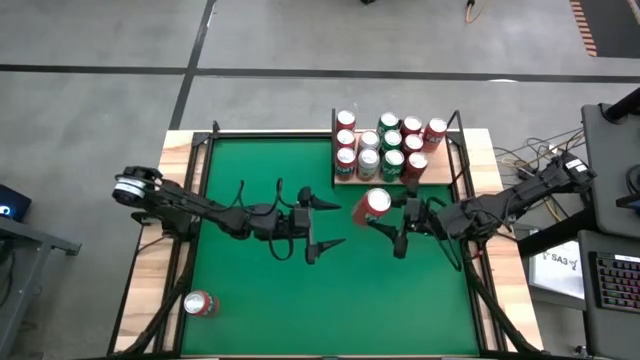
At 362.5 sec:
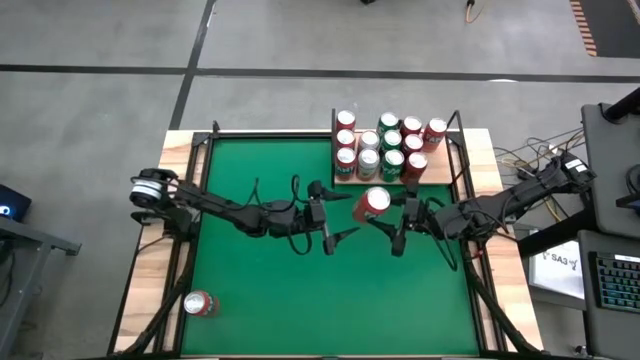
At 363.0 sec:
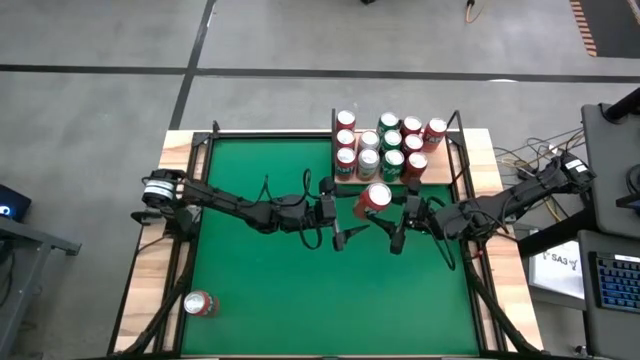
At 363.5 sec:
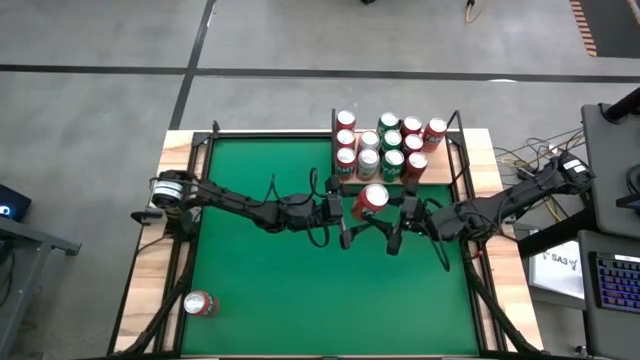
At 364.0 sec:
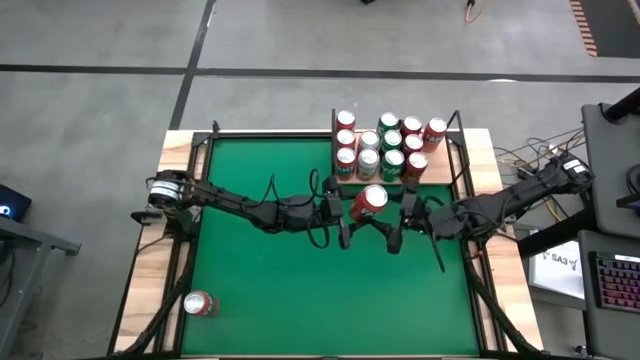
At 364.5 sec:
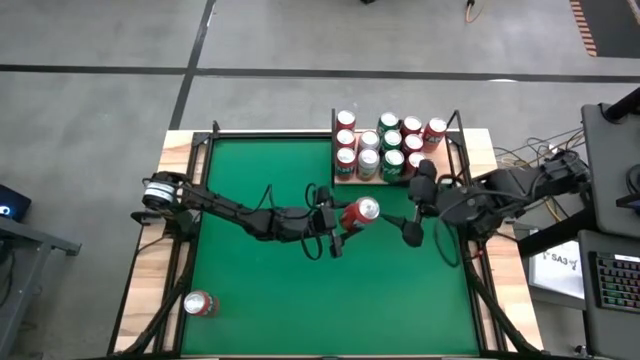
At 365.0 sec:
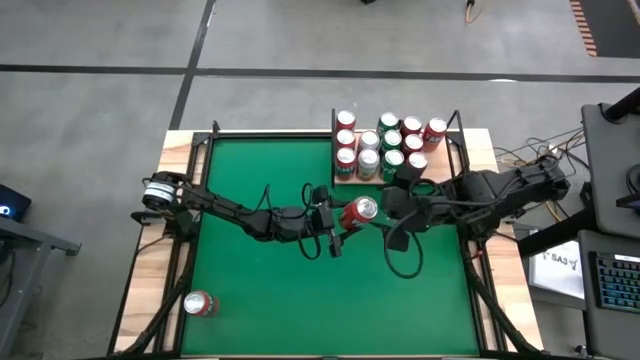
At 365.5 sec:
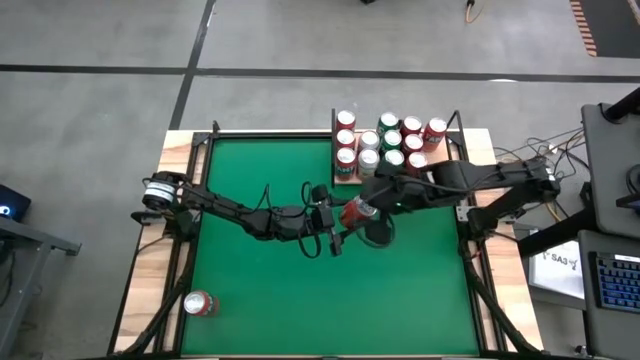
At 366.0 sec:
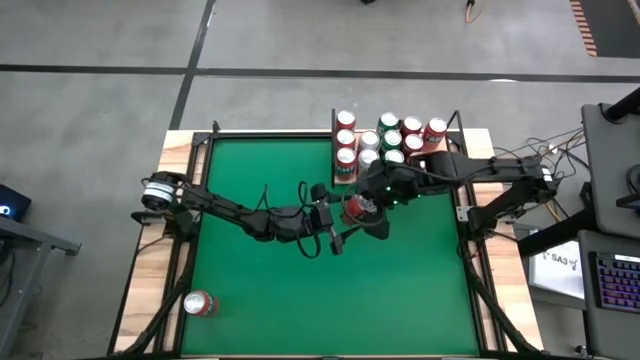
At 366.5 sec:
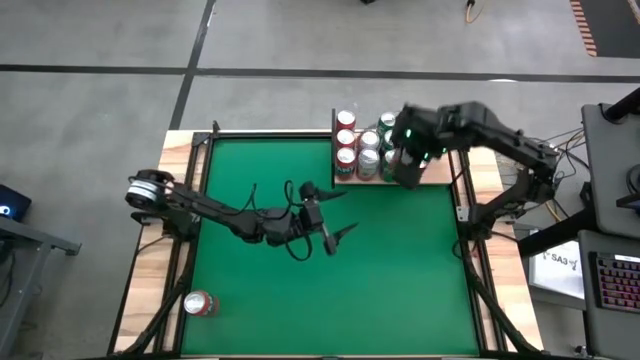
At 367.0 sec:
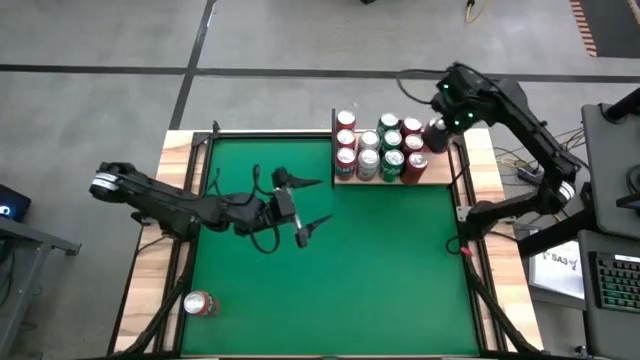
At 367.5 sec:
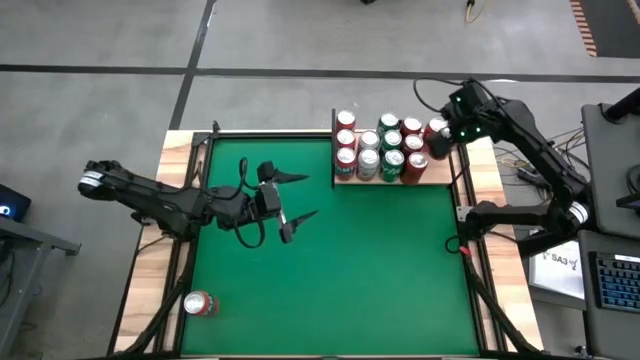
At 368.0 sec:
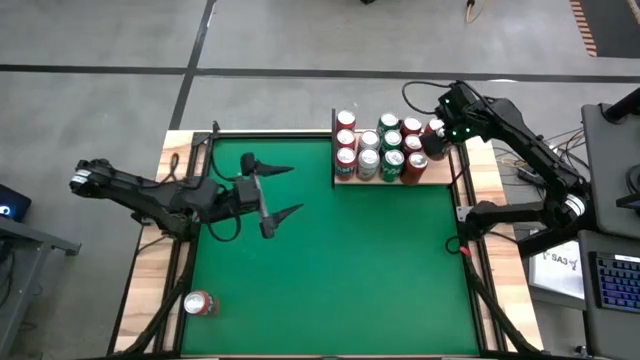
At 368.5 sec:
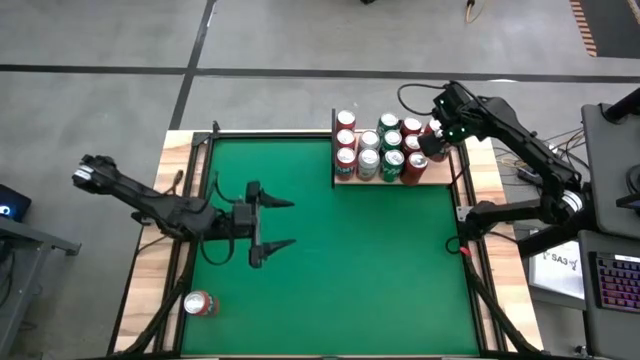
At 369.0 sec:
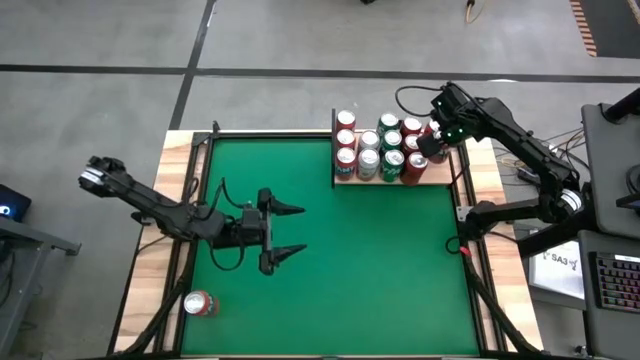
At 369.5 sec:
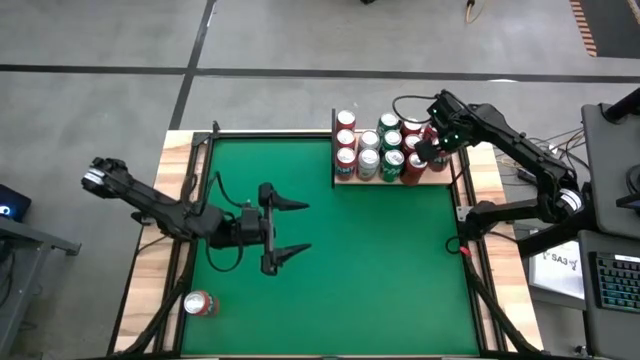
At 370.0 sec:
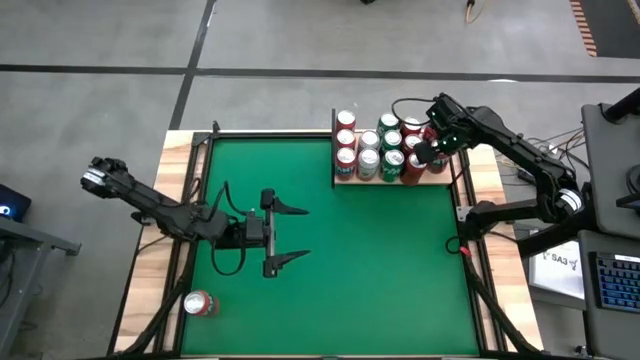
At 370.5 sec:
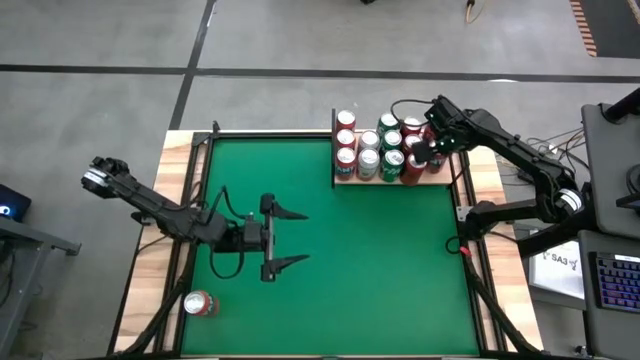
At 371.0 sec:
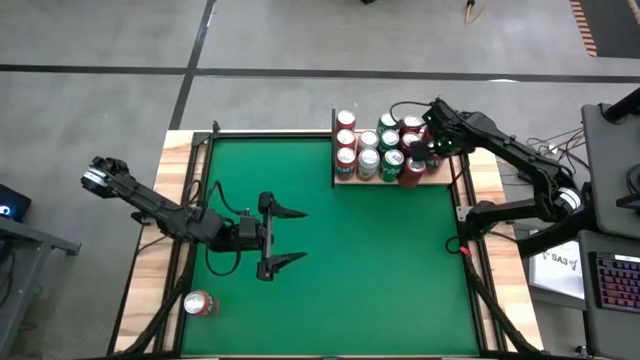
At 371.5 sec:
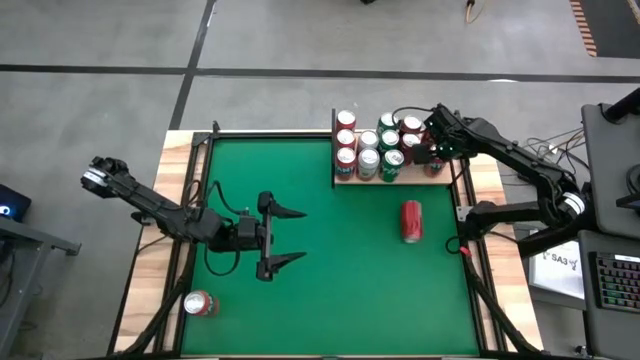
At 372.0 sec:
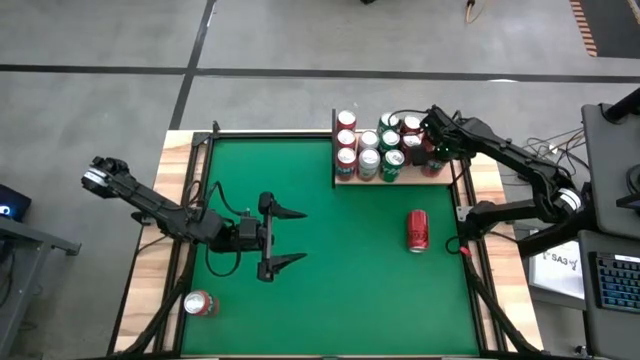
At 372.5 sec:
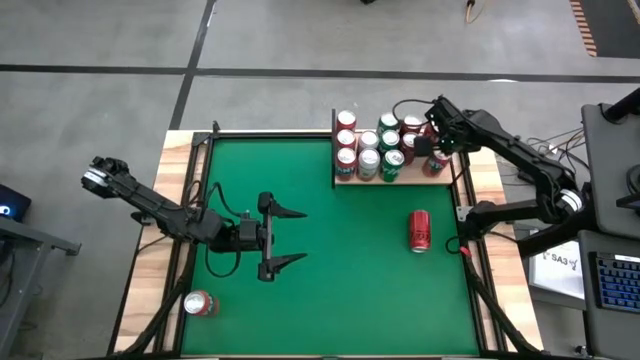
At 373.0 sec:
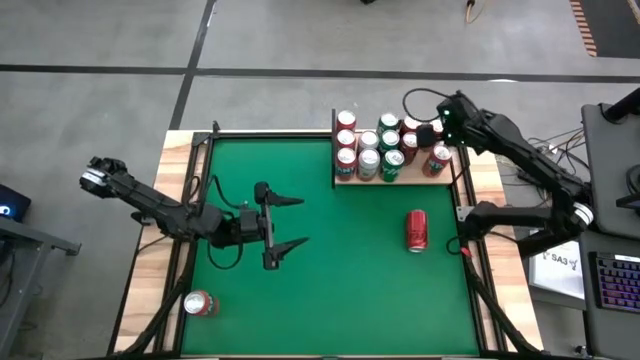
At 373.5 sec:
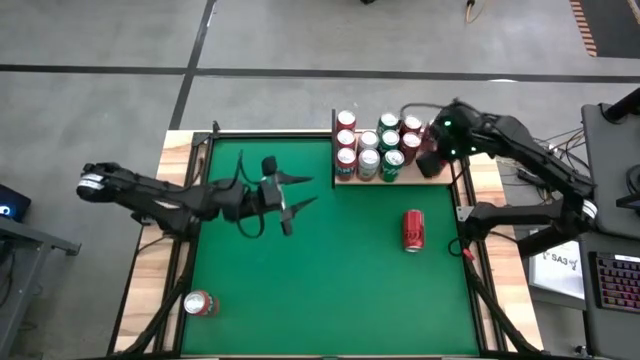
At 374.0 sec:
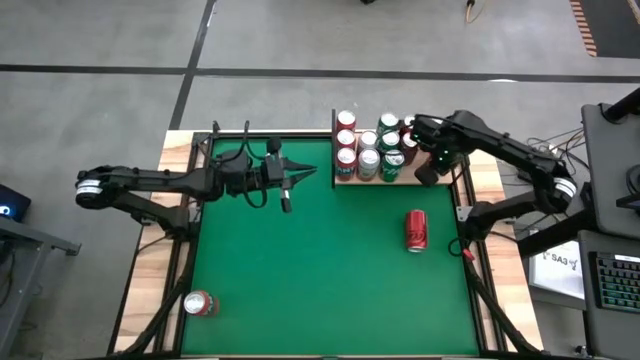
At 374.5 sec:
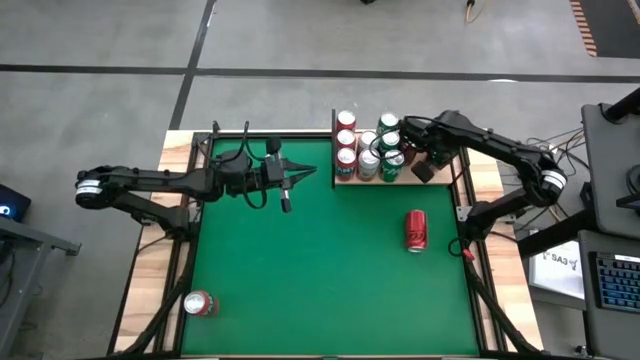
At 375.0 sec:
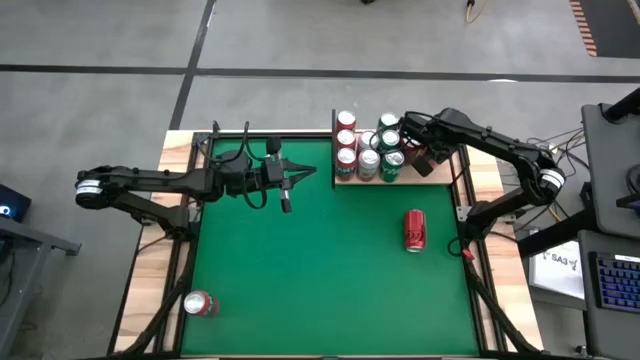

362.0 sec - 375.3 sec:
Task: Place canned beverage on shelf
Put the red soda can on the shelf aligned with the other red soda can

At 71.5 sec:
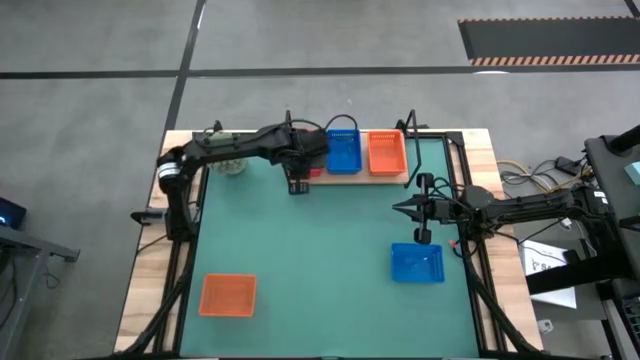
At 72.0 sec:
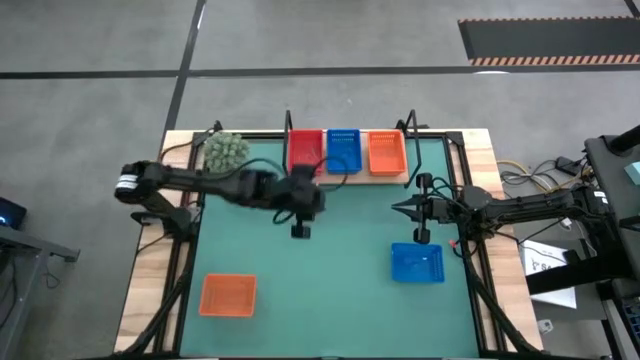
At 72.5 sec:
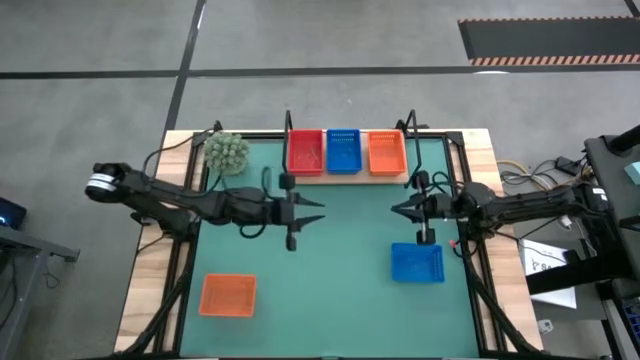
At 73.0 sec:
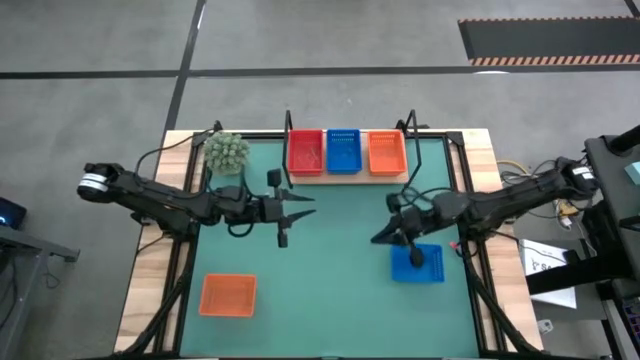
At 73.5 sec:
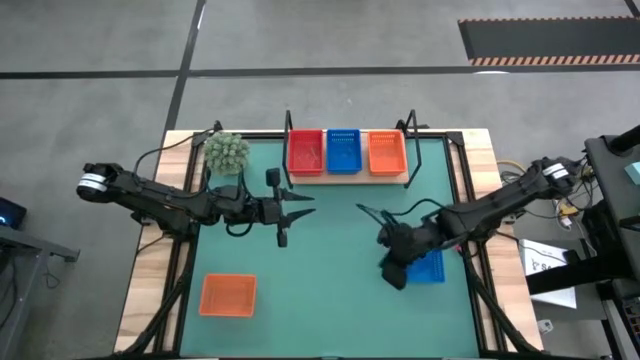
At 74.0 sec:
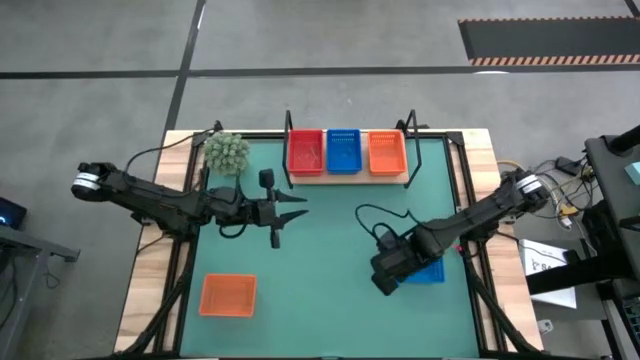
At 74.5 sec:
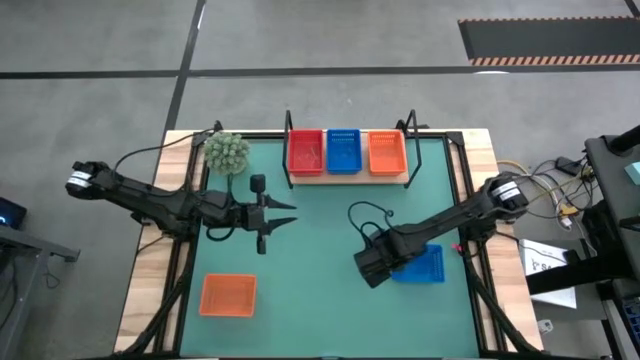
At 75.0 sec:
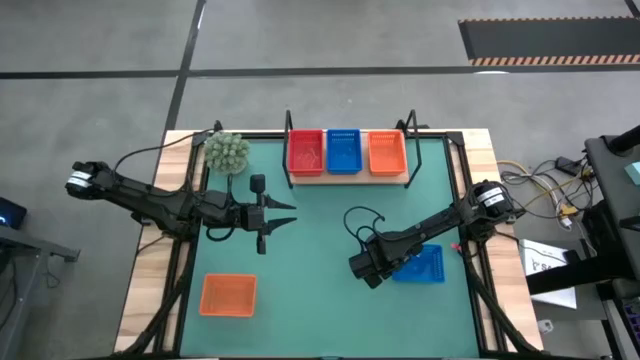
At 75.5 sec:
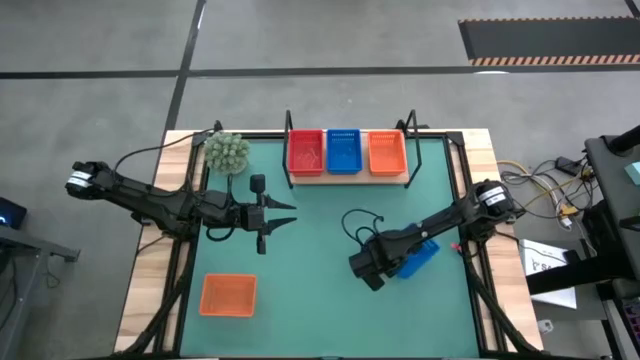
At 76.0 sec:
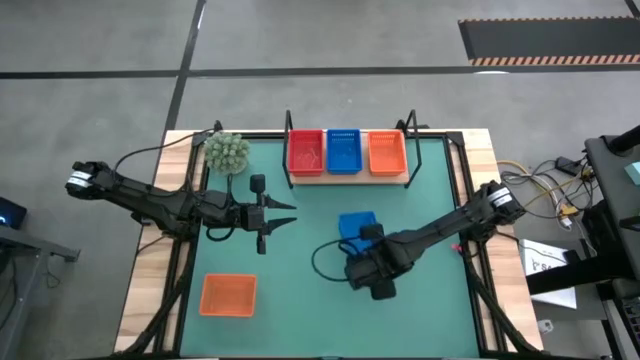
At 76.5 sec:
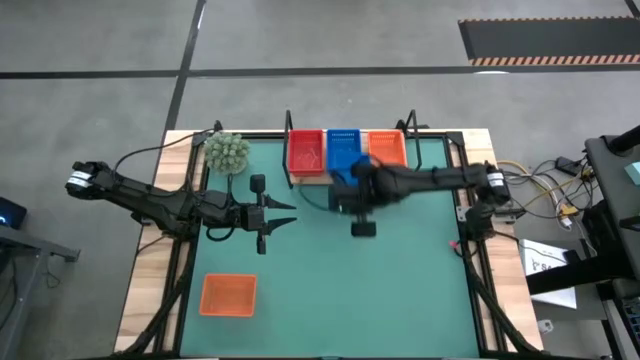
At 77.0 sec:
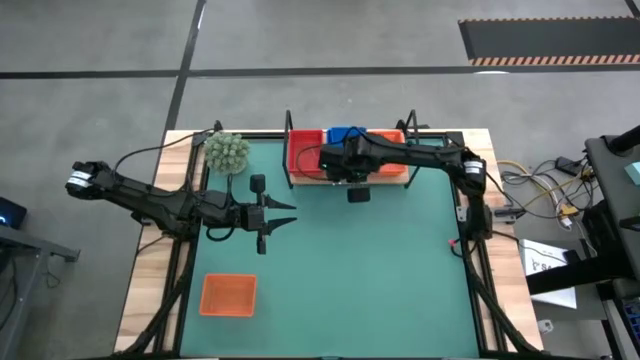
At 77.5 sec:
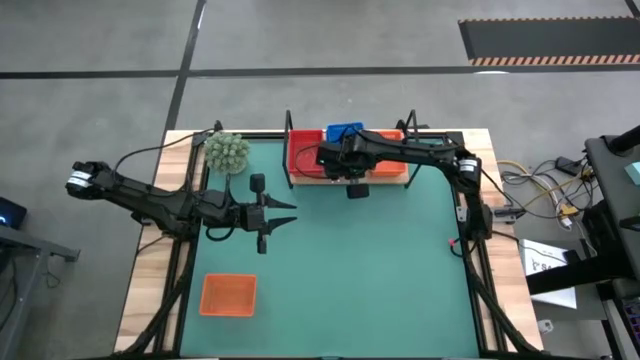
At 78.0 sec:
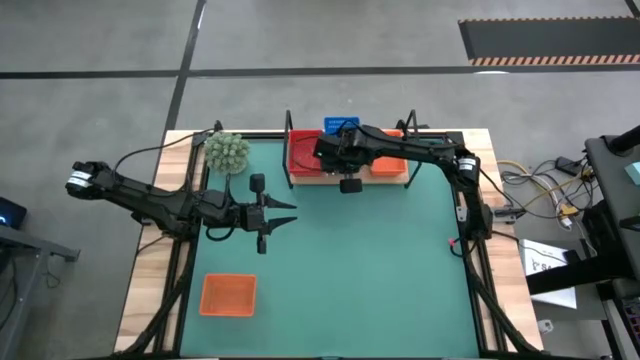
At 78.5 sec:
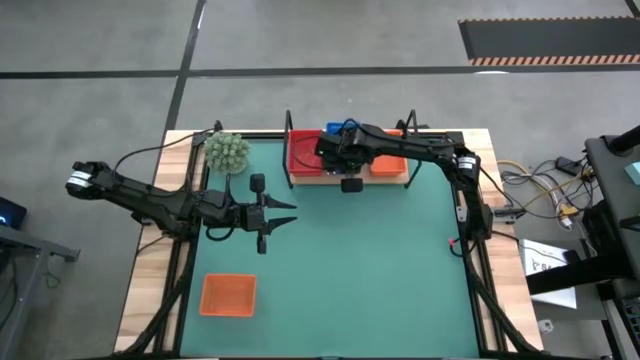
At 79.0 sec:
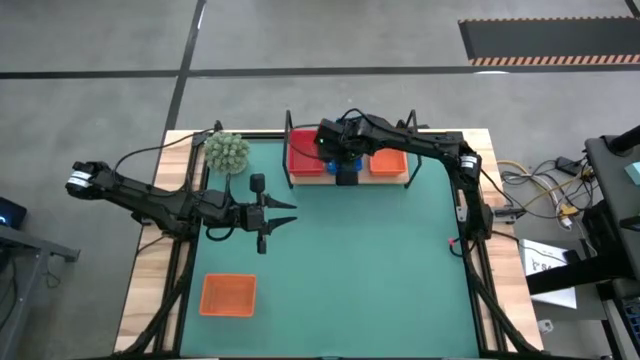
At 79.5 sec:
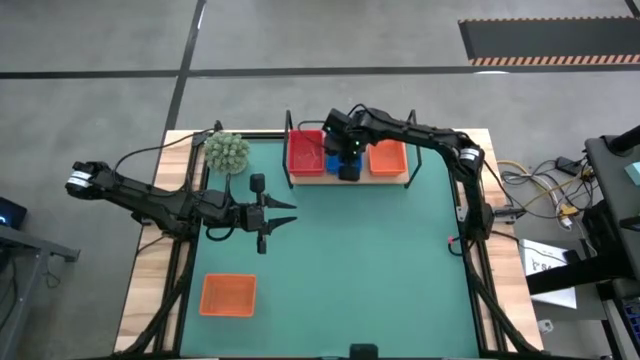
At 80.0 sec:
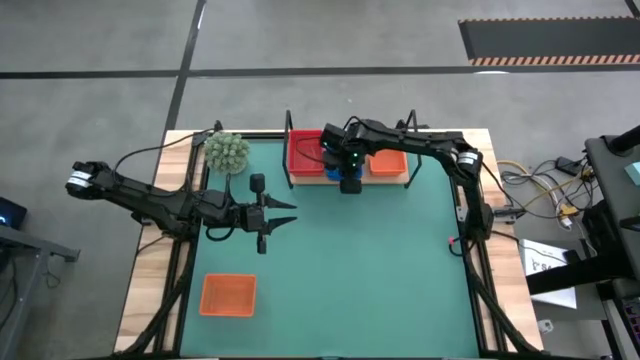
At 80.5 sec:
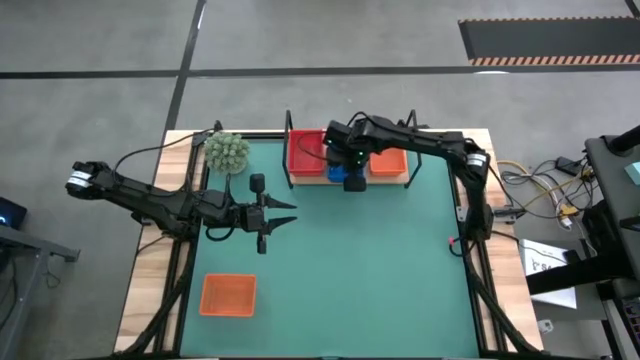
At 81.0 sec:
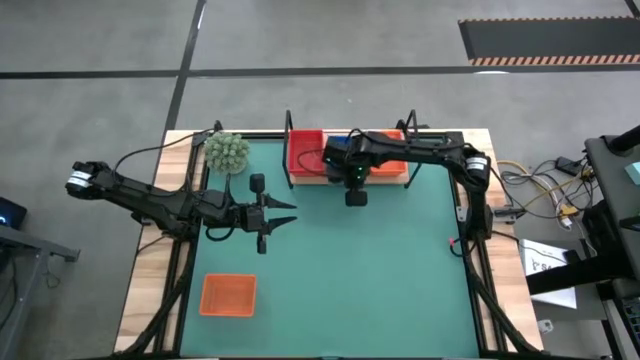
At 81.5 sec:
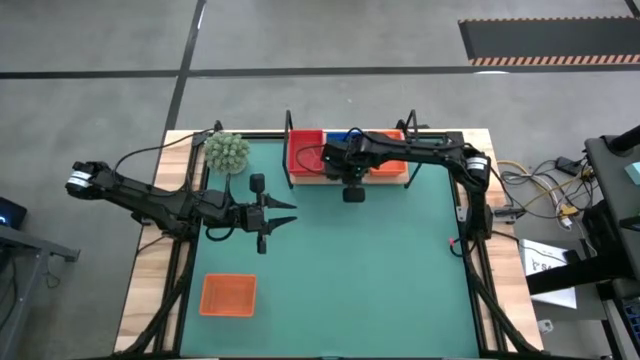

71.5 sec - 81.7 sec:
Task: Stack baskets on shelf by color
Stack the blue bin on top of the stacked blue bins on the shelf
